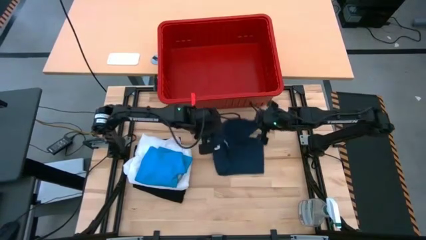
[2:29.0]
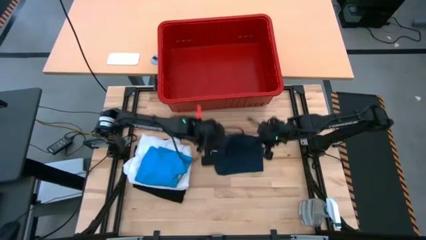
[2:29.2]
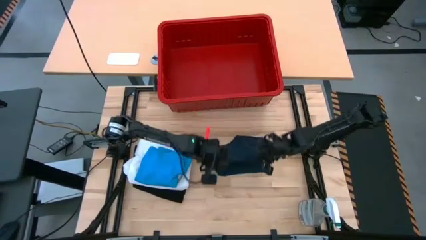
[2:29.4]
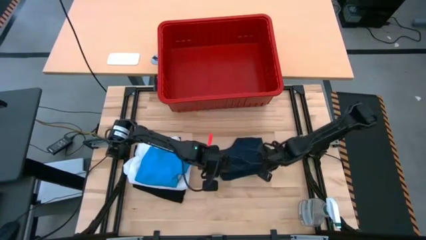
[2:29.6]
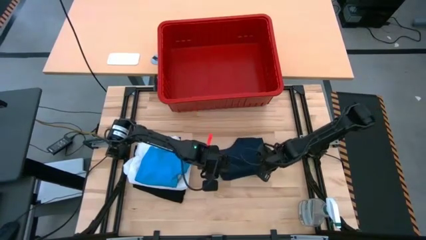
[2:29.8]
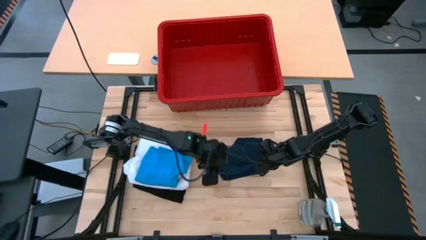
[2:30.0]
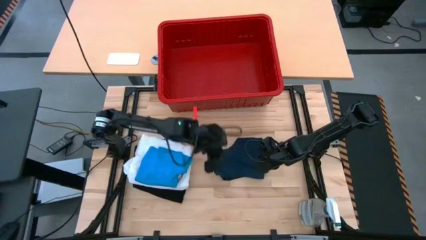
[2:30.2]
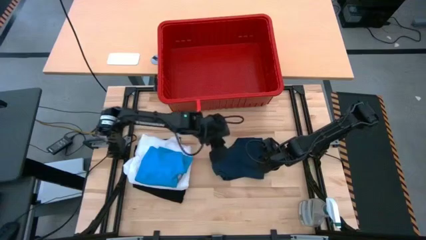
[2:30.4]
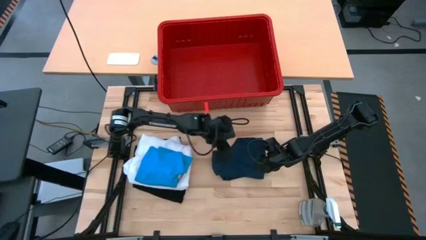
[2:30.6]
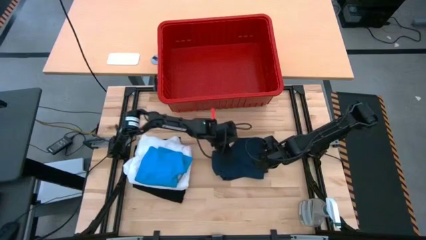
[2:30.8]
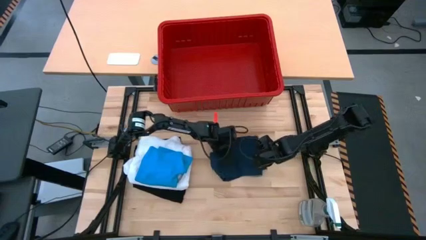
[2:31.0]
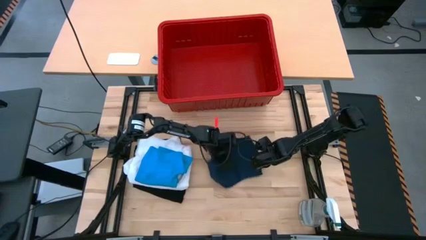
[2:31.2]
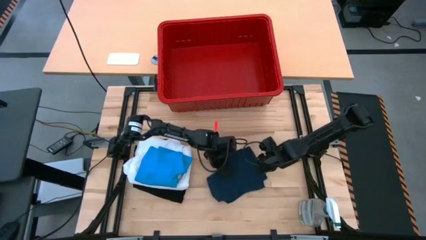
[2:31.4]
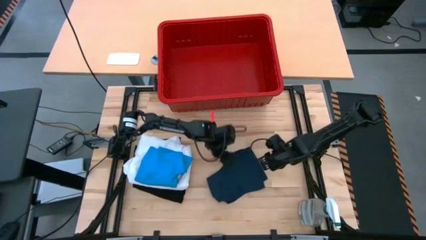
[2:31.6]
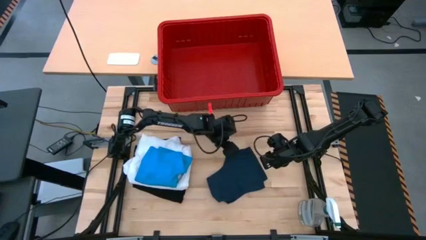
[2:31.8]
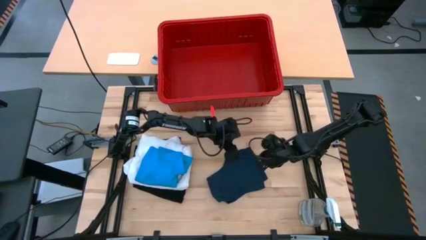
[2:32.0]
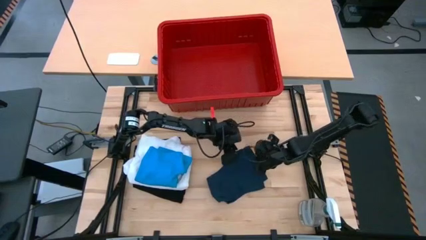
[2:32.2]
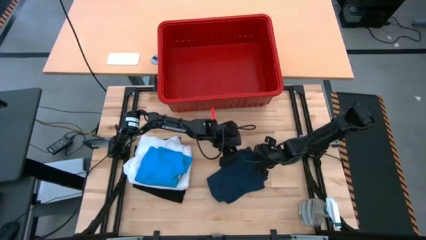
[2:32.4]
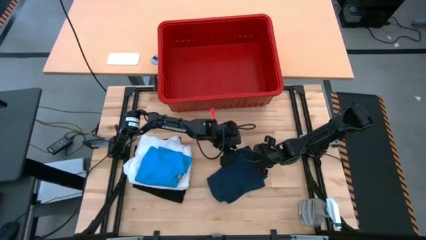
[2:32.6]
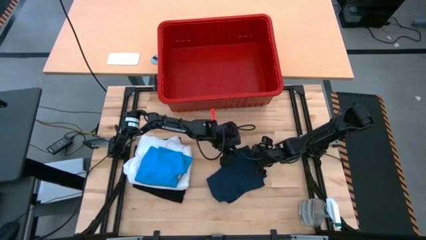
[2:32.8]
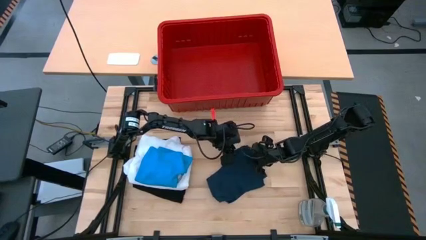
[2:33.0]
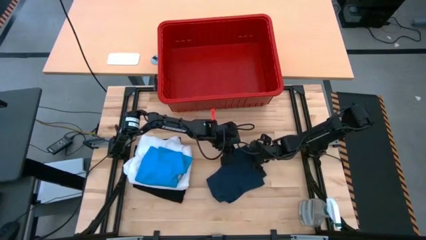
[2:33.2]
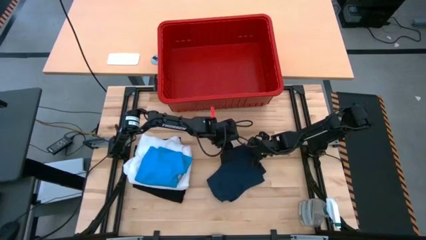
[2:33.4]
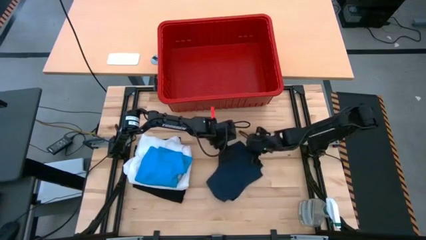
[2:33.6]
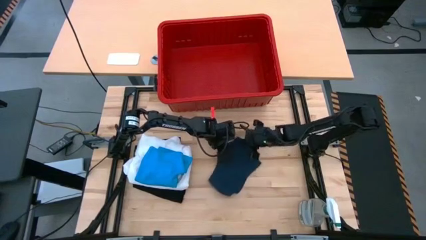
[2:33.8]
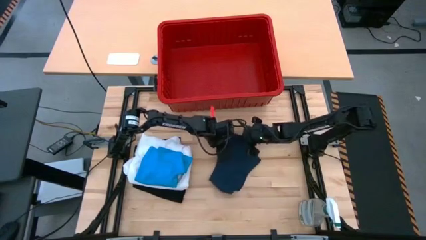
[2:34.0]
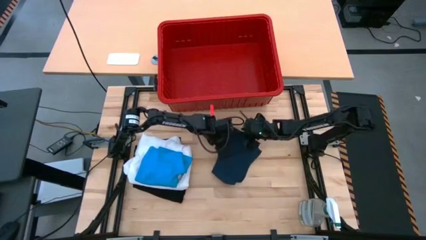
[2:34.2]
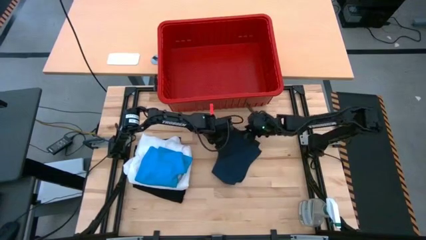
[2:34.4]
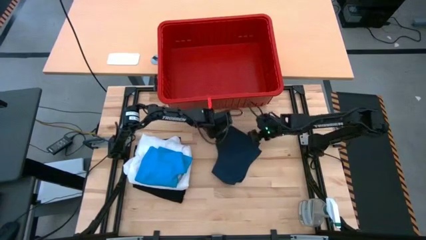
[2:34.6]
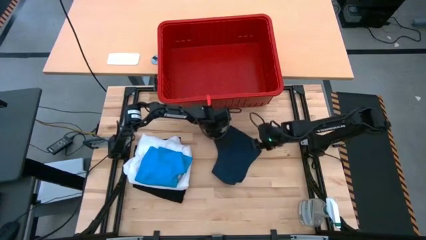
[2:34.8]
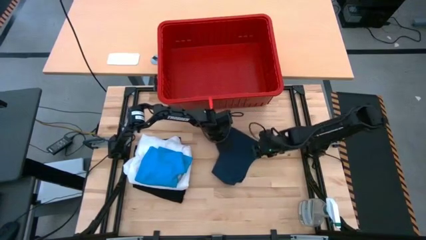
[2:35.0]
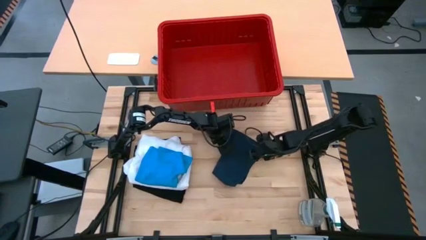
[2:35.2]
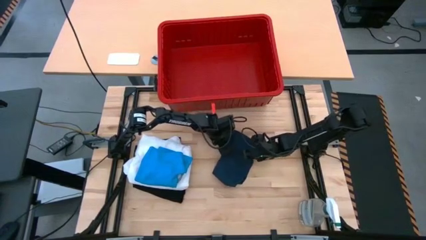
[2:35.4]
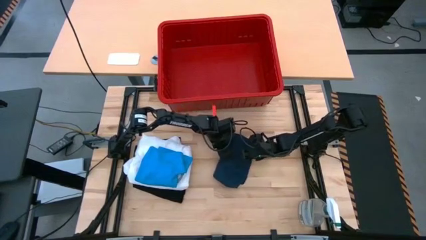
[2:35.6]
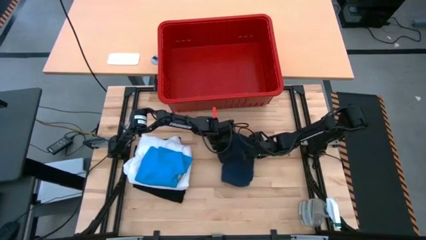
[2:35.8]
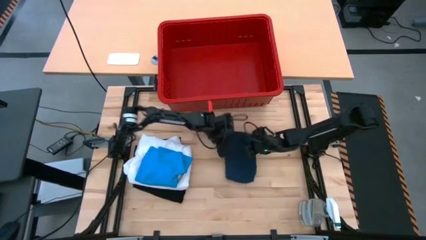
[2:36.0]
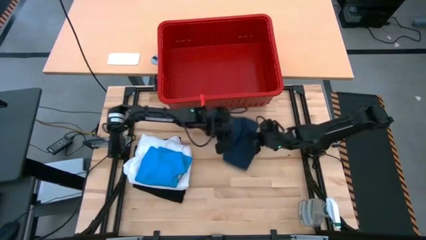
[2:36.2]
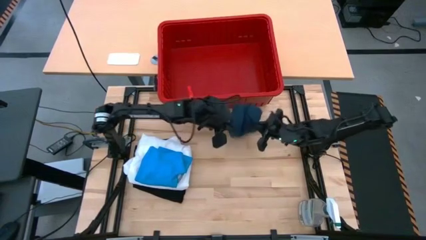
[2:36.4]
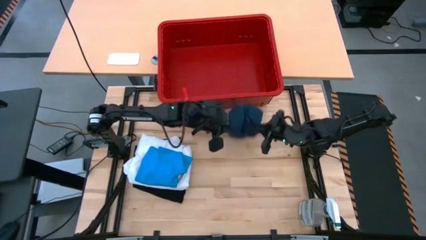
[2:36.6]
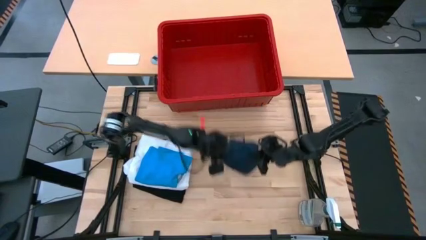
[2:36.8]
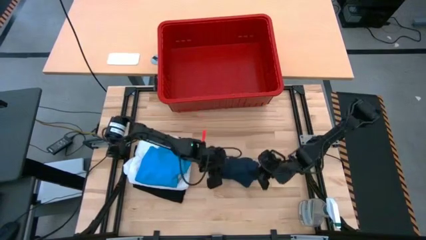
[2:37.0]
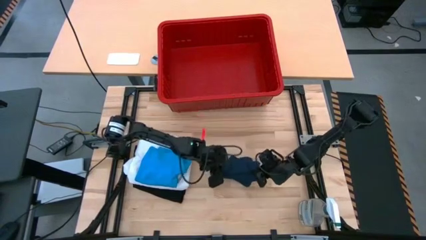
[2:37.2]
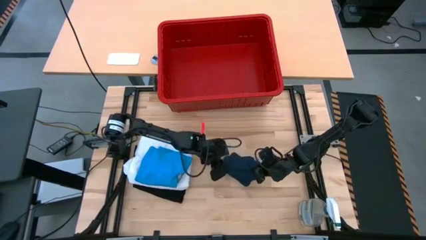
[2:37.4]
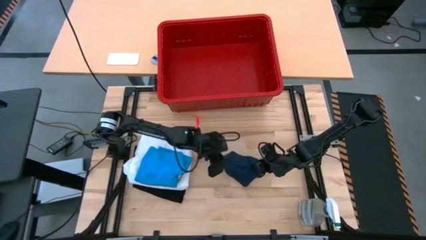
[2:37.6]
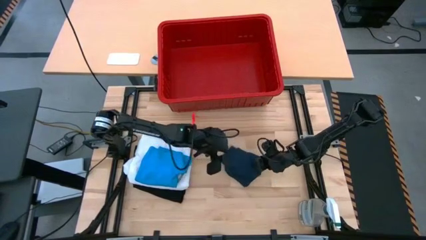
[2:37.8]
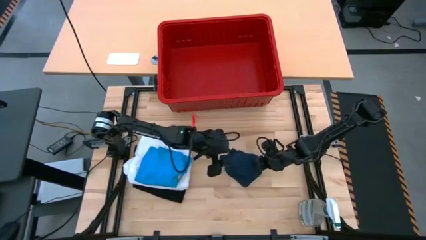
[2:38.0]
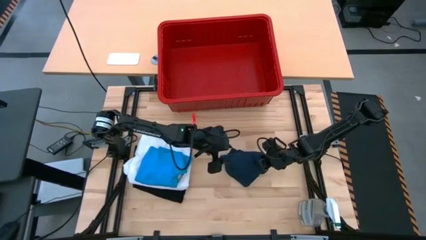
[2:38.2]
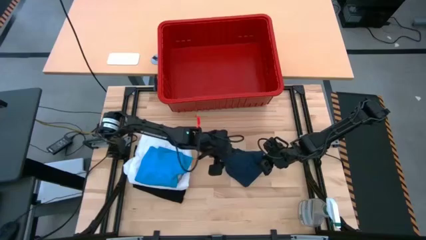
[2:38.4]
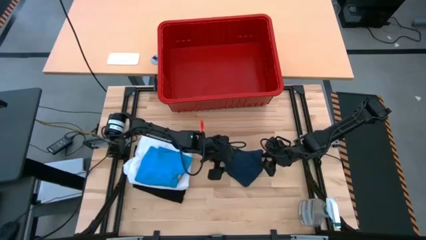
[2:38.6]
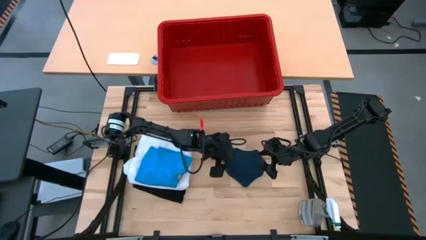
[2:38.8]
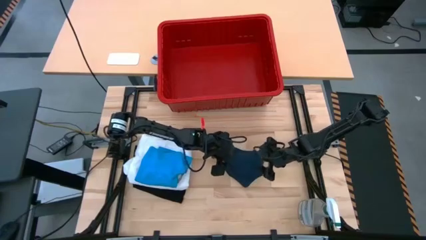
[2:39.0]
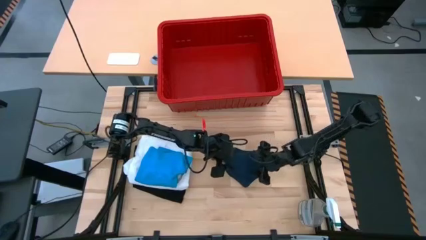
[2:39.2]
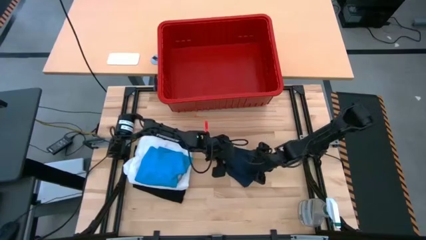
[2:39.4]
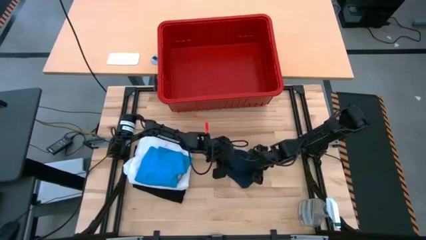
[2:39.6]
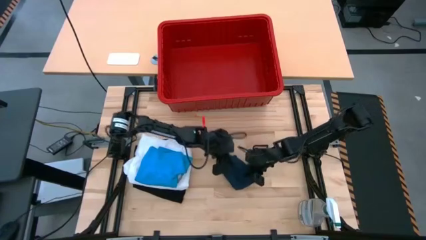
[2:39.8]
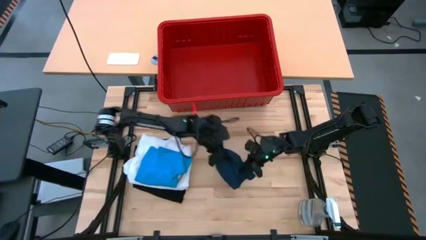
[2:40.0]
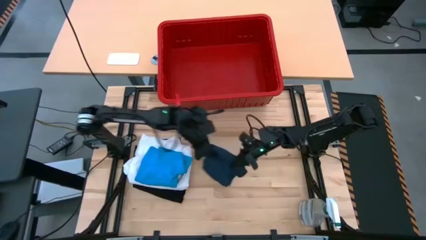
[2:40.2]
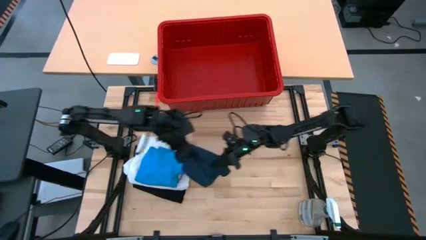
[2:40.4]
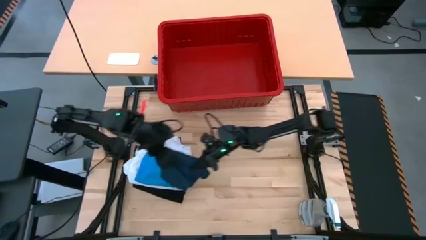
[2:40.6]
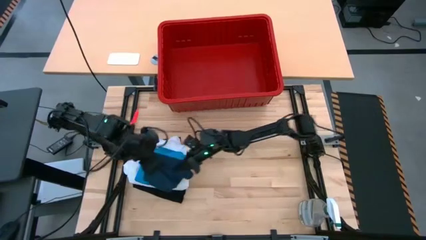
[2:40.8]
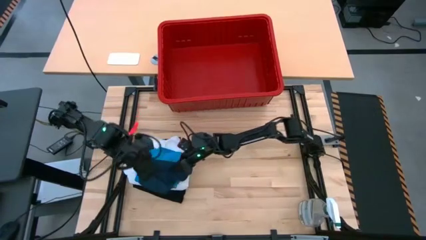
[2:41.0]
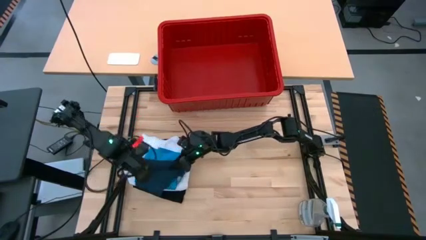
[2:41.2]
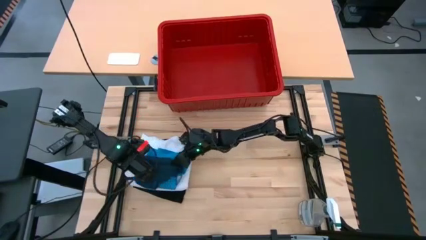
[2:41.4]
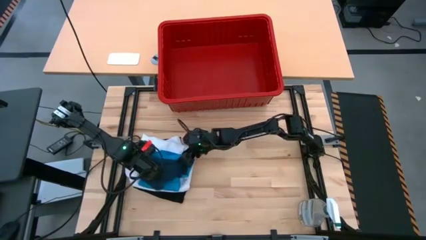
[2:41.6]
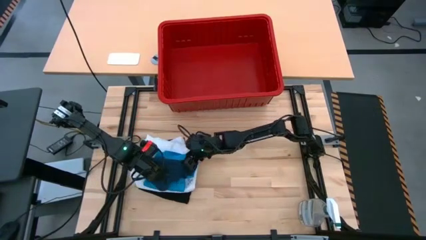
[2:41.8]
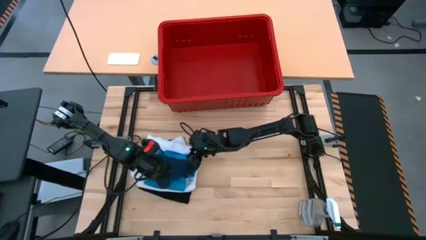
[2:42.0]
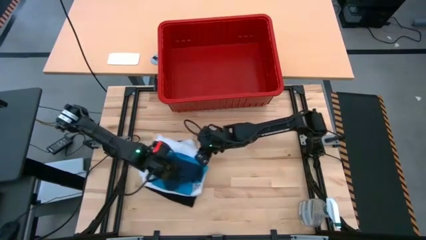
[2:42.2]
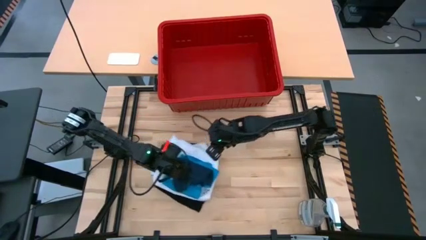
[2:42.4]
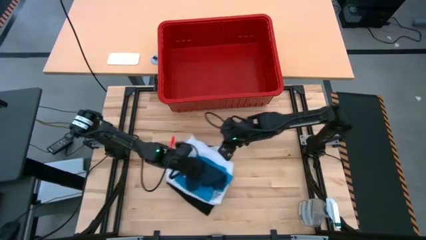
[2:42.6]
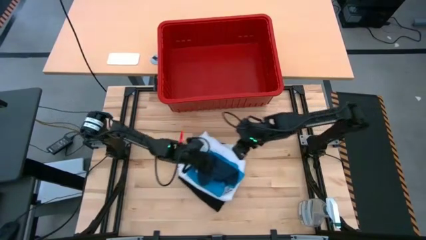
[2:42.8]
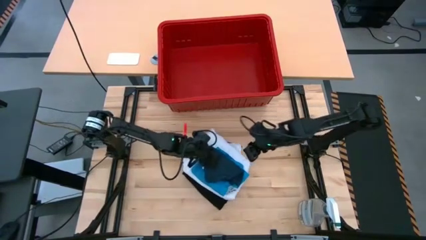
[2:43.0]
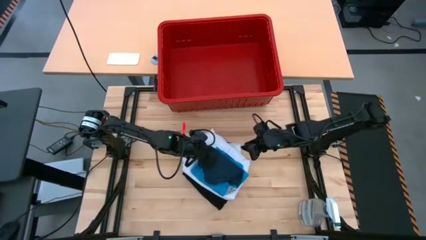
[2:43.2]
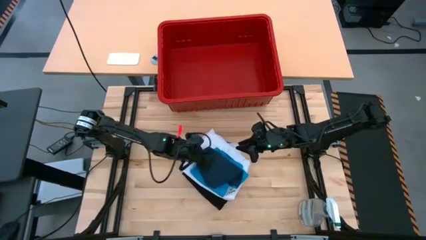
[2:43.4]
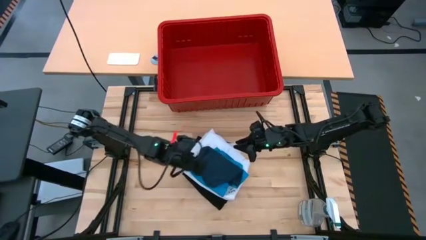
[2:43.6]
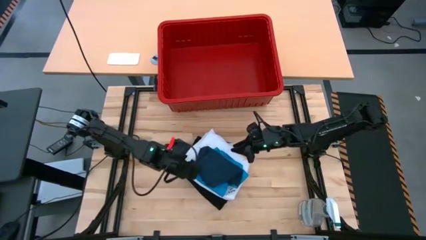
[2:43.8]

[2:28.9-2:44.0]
Task: Fold laundry
Fold the dark blue short

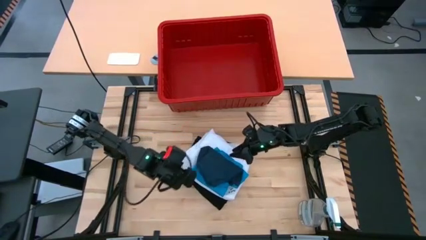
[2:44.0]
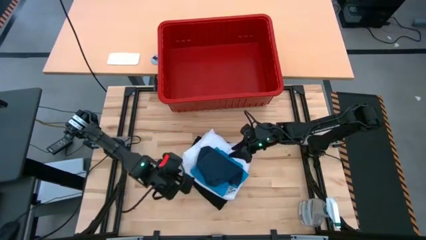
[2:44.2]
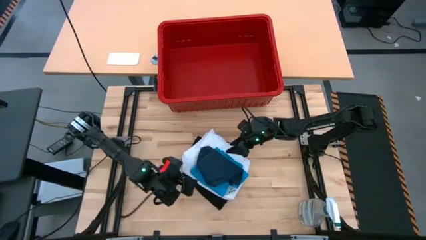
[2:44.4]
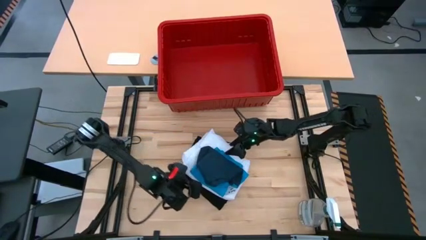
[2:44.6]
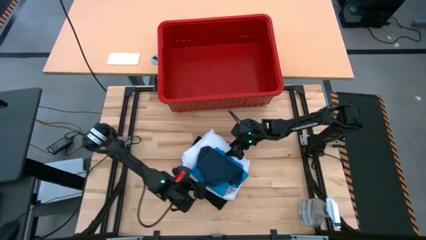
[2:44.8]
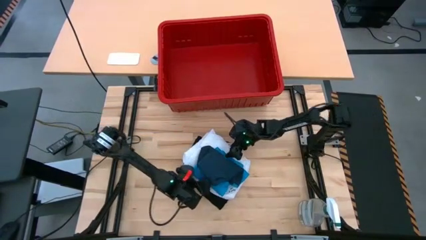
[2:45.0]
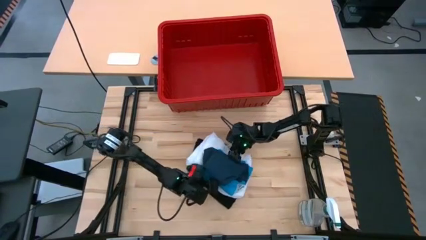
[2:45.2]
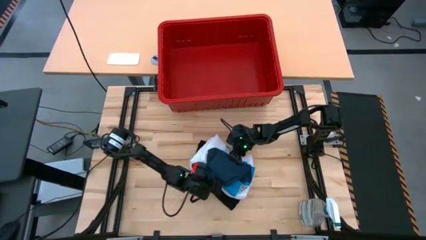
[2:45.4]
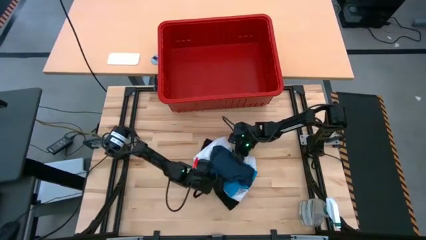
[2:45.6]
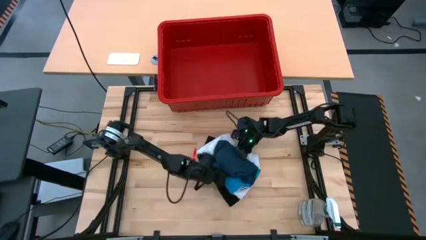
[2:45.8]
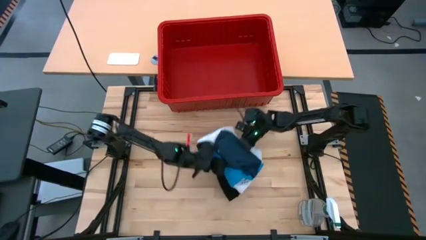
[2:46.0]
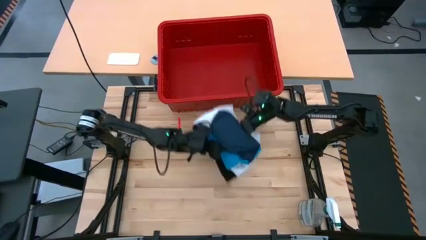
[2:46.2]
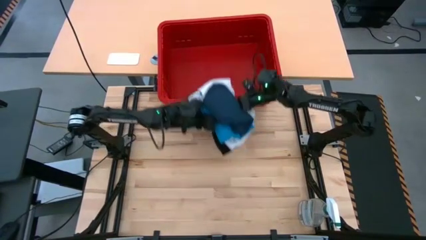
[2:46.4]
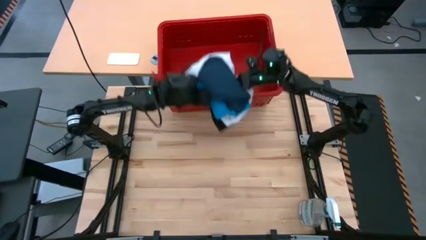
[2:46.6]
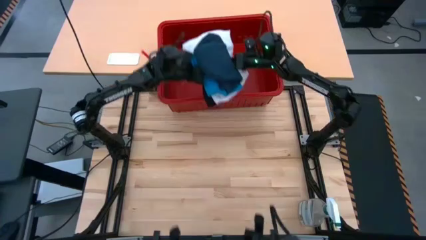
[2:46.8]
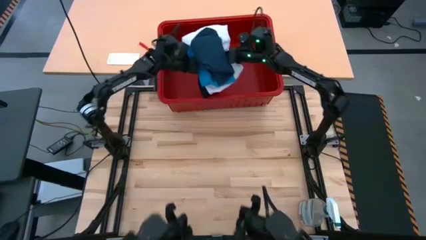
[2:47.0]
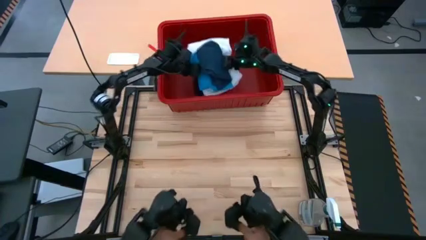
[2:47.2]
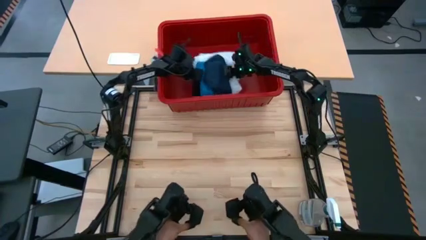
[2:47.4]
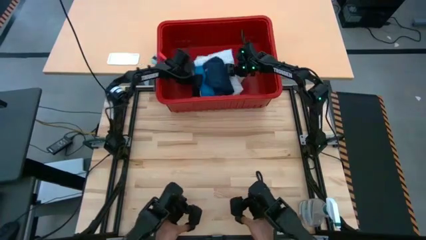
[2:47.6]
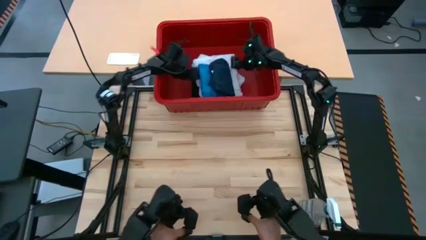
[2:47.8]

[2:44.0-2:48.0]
Put the folded clothes into the bin
